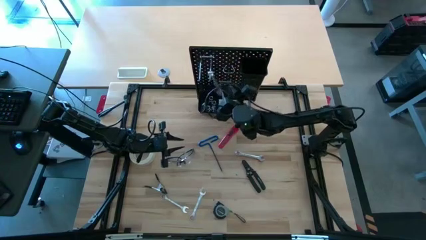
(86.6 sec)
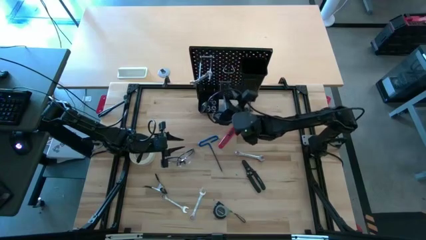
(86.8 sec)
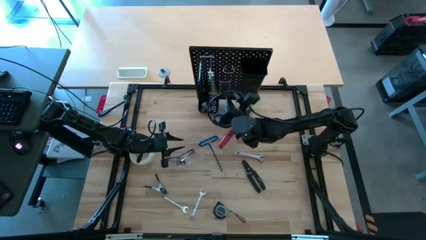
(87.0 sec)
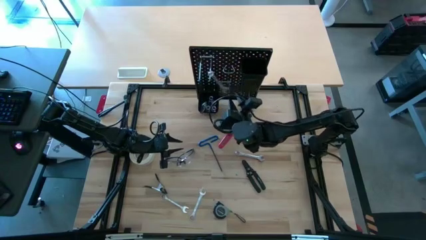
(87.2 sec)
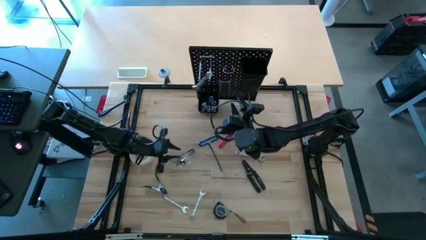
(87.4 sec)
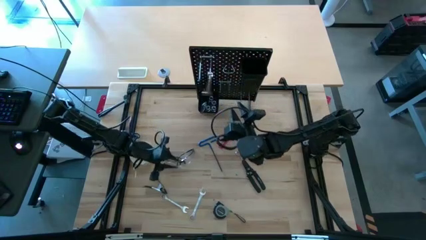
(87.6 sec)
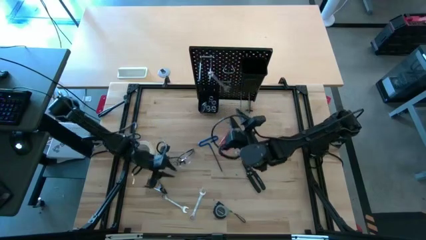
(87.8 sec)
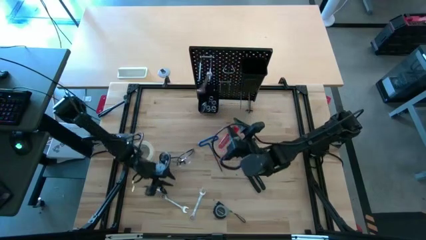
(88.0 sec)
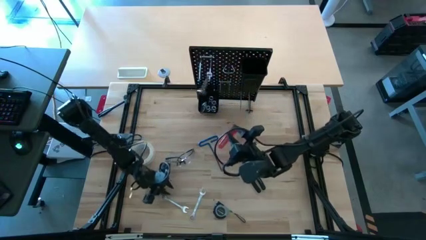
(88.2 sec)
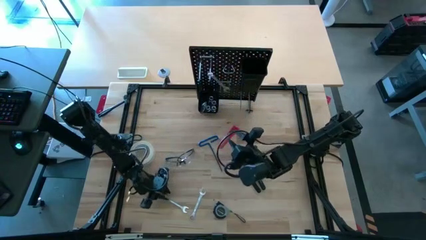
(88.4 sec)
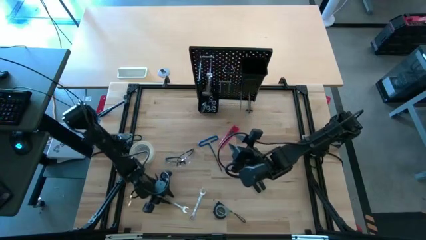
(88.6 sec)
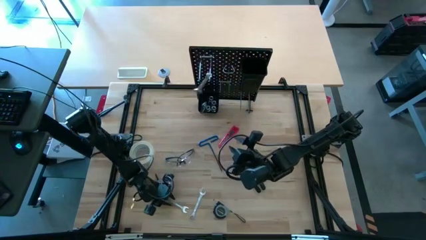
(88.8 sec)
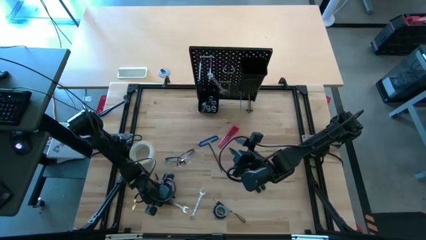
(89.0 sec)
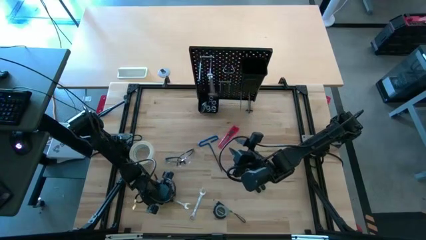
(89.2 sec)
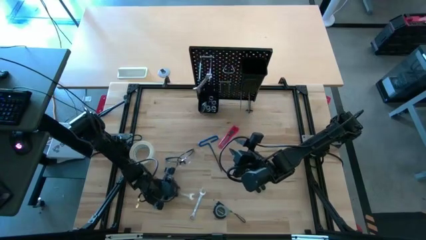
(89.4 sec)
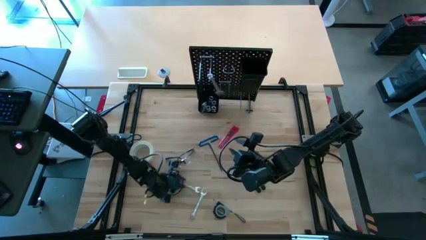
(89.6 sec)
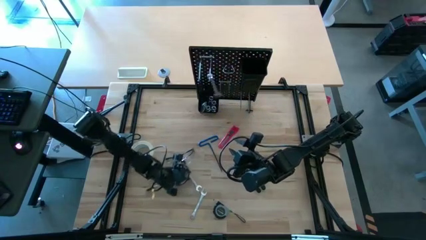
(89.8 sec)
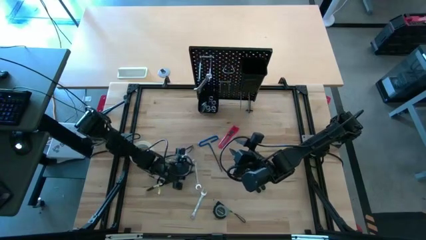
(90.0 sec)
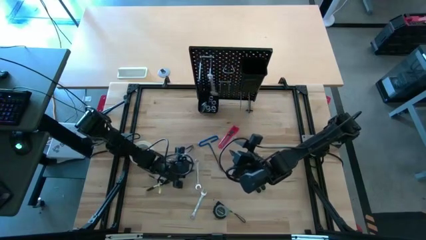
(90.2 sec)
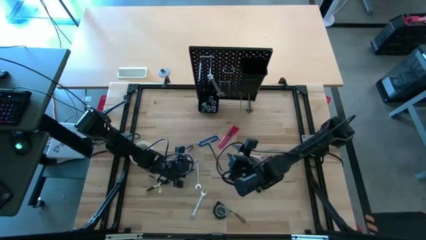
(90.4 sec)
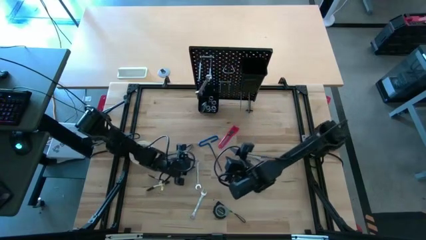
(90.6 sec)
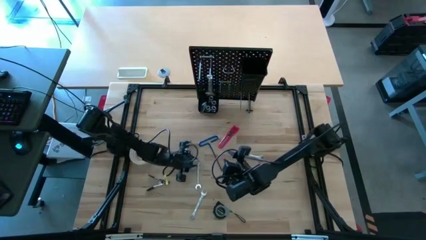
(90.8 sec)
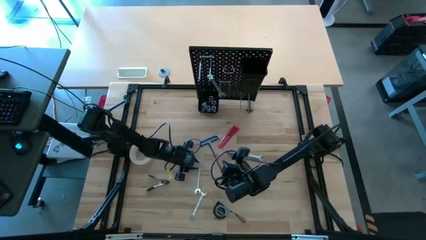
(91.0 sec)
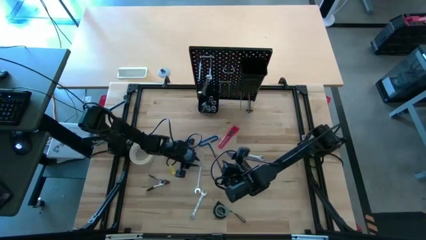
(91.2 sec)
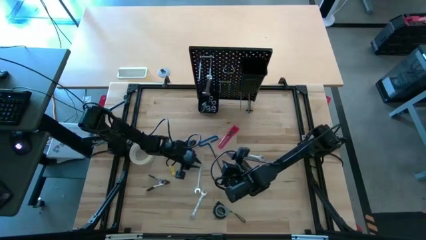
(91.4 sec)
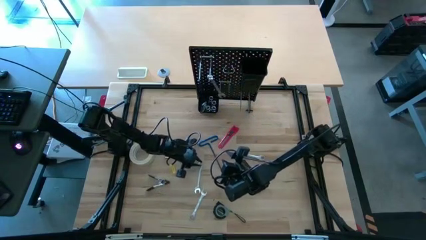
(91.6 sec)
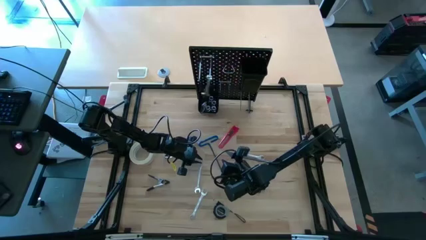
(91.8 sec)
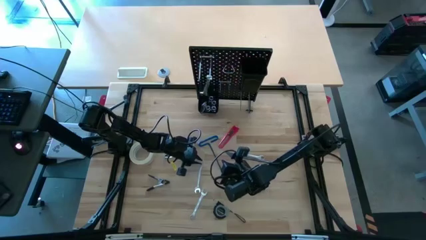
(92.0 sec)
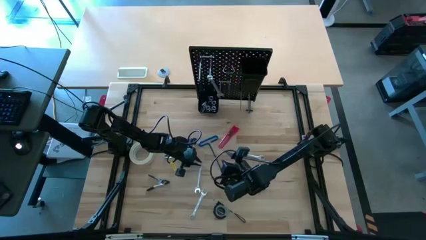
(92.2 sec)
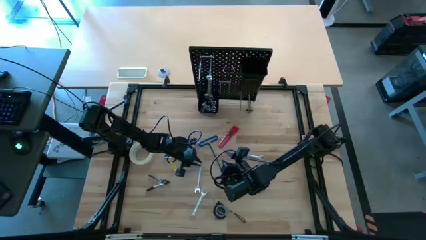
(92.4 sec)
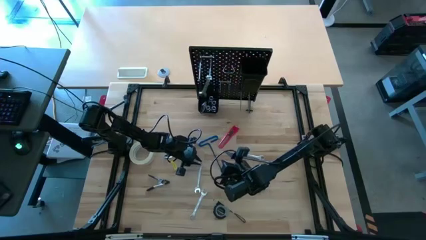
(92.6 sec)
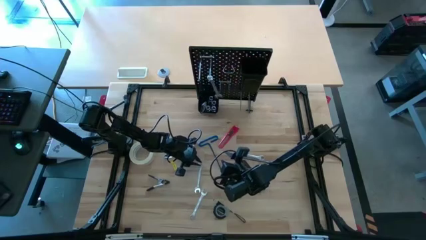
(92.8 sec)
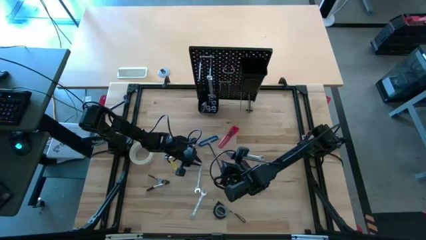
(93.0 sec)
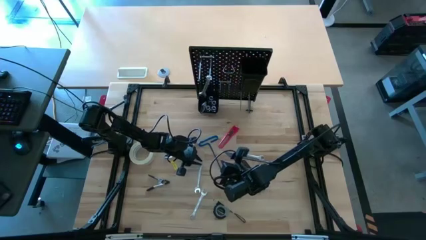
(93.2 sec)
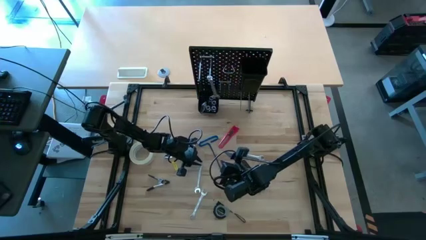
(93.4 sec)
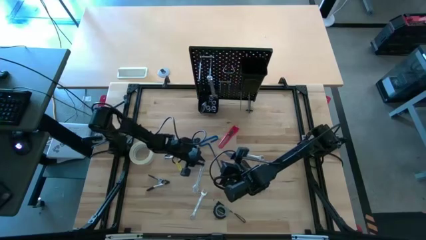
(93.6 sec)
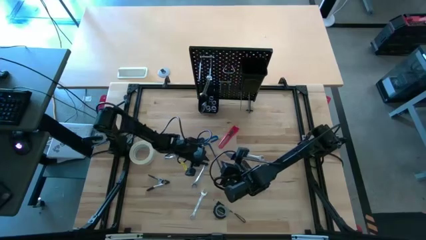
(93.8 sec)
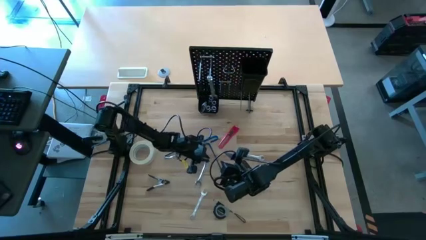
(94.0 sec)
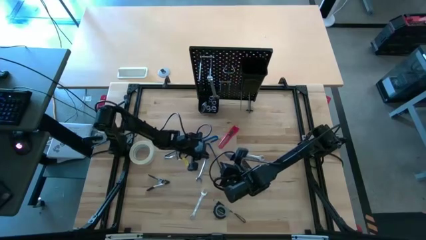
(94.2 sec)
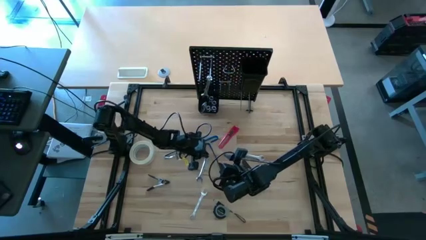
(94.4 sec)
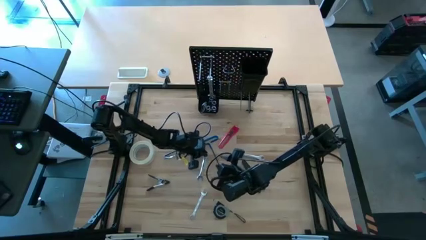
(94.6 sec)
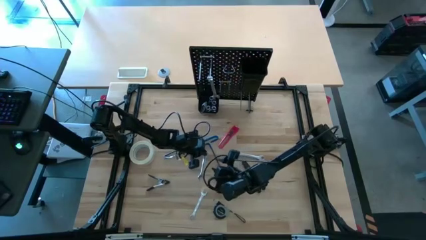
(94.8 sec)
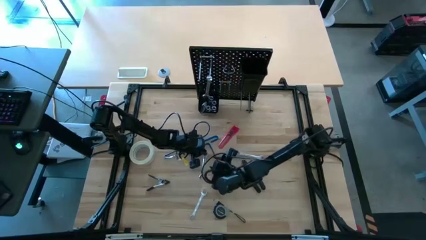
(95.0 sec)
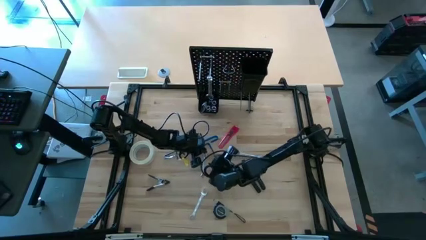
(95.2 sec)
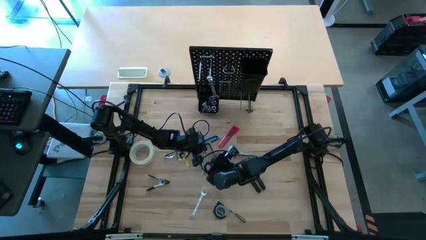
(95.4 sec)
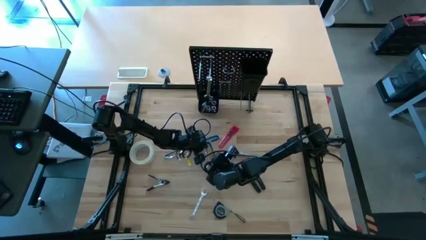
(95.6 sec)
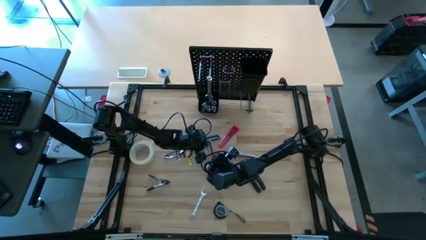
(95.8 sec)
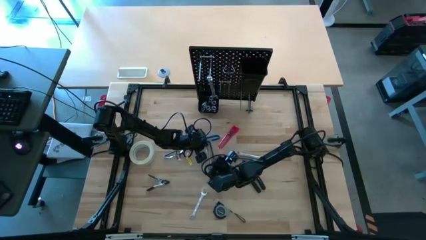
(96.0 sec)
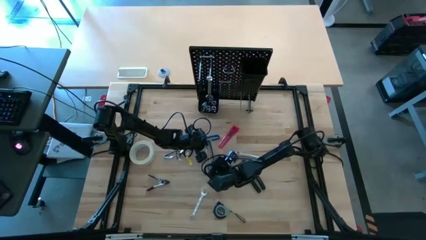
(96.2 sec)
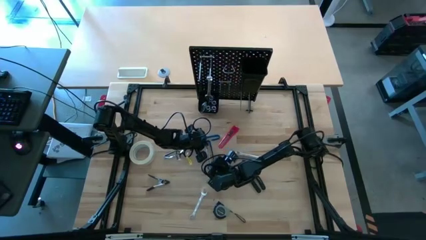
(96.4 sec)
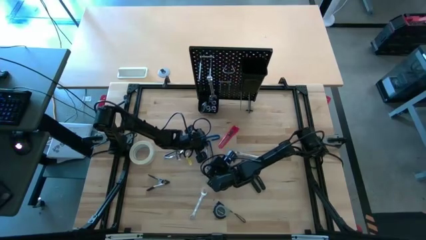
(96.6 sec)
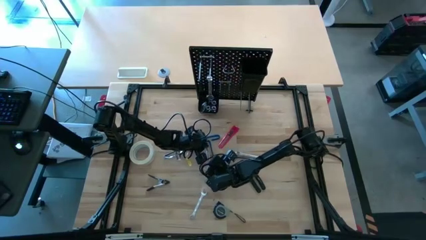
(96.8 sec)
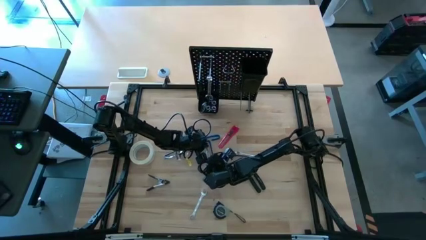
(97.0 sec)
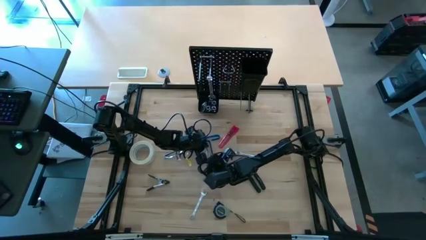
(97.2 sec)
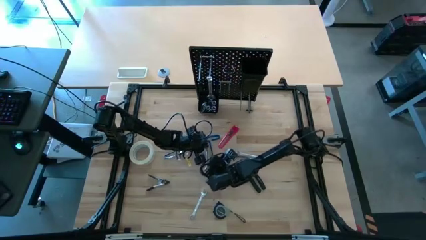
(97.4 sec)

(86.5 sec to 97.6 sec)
Task: Hang tools onto peg board
Hang the bottom left wrench onto the peg board

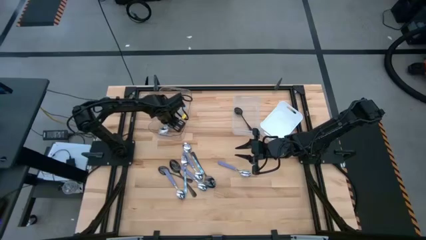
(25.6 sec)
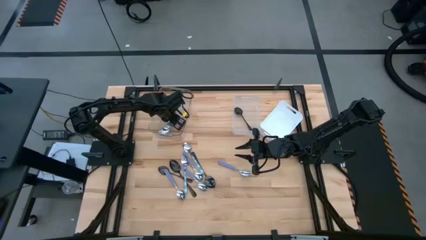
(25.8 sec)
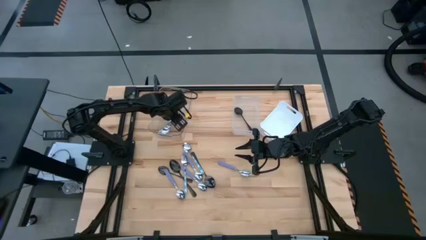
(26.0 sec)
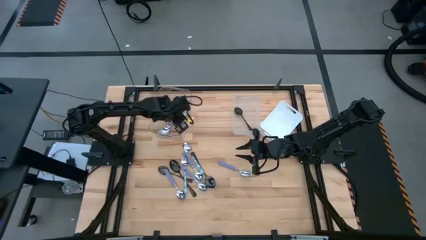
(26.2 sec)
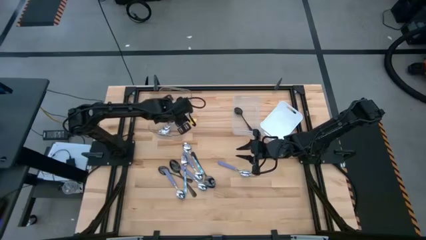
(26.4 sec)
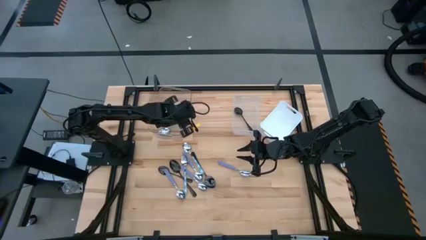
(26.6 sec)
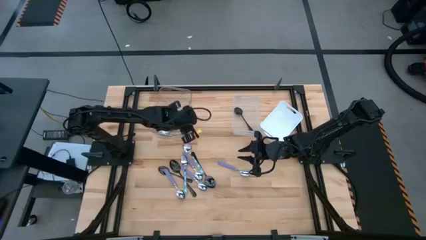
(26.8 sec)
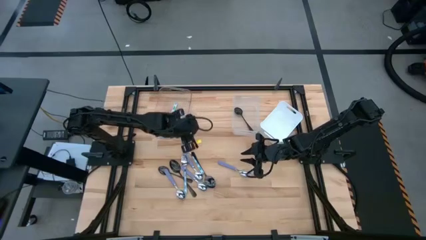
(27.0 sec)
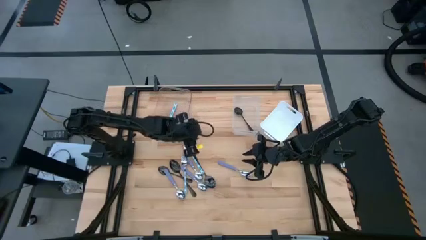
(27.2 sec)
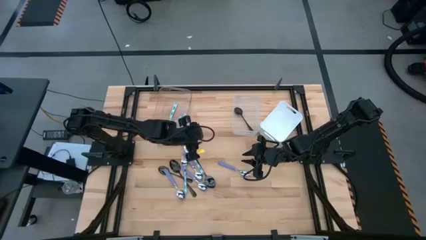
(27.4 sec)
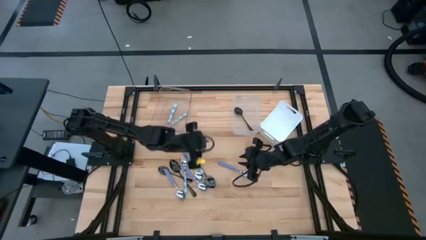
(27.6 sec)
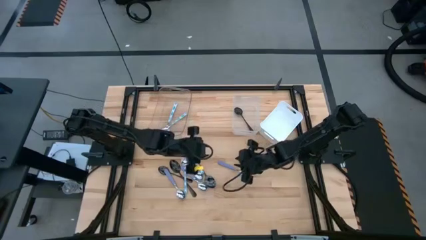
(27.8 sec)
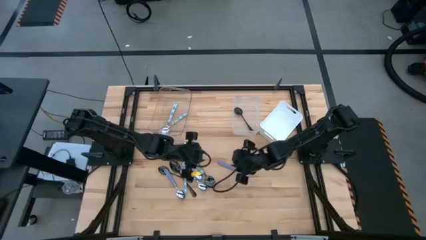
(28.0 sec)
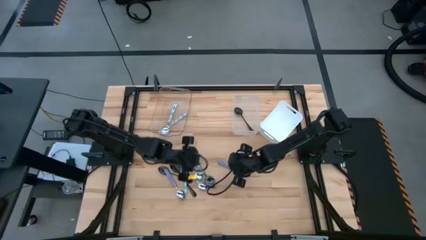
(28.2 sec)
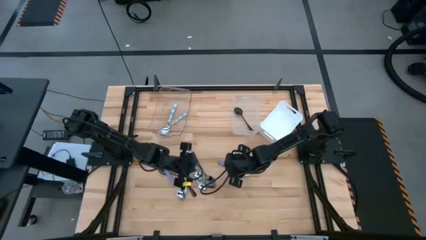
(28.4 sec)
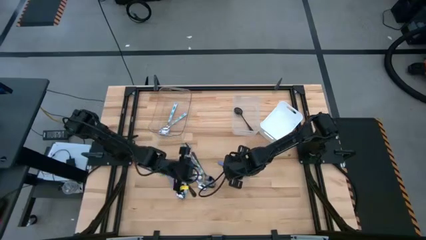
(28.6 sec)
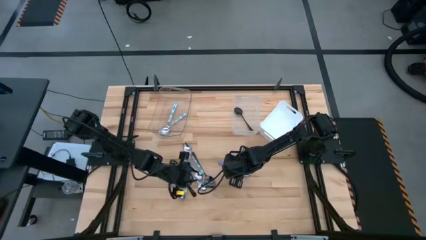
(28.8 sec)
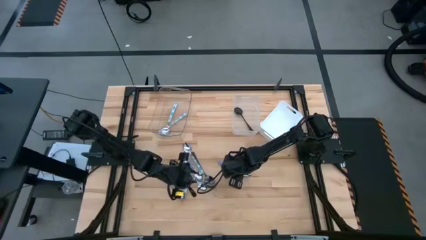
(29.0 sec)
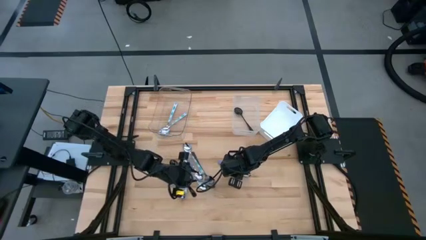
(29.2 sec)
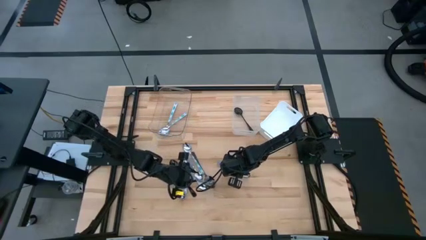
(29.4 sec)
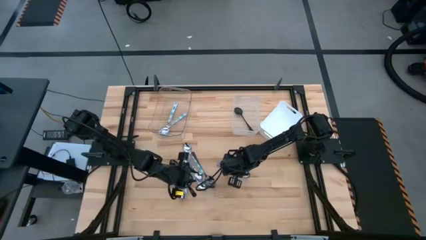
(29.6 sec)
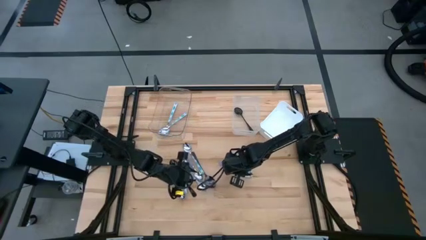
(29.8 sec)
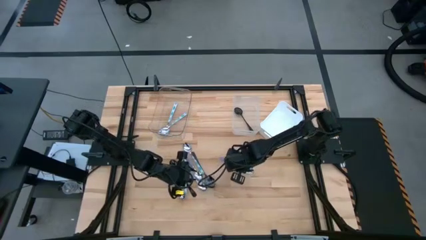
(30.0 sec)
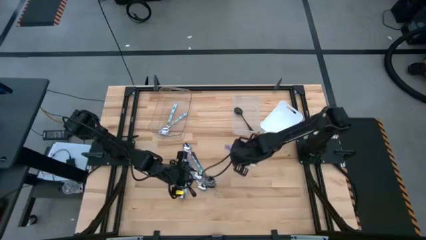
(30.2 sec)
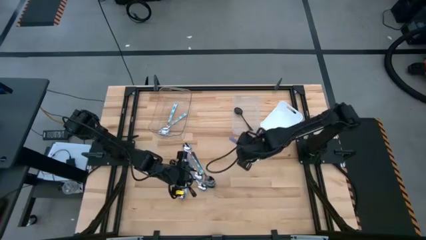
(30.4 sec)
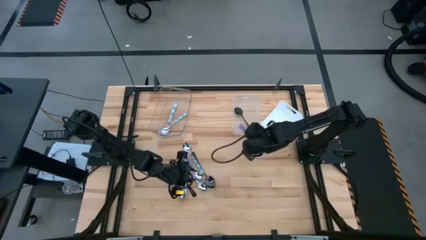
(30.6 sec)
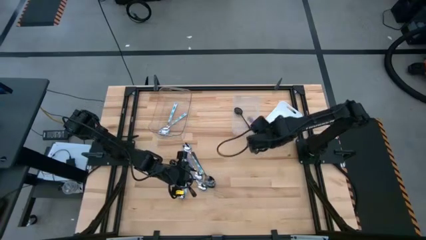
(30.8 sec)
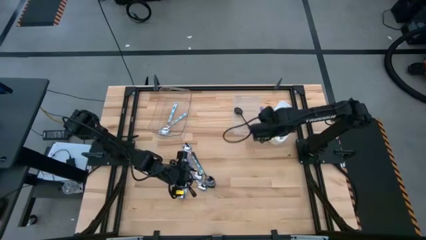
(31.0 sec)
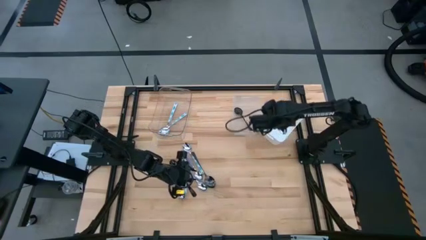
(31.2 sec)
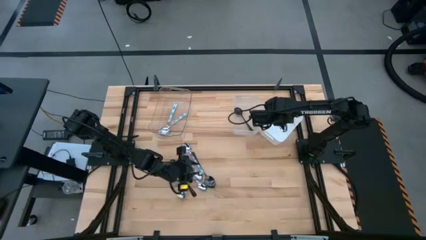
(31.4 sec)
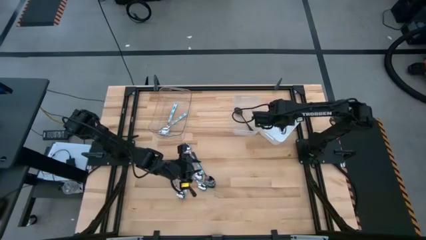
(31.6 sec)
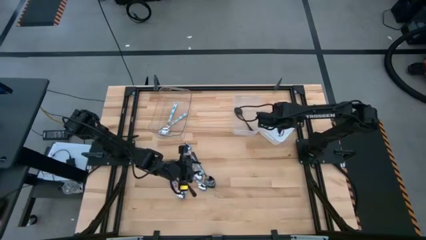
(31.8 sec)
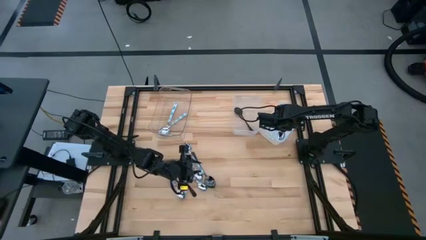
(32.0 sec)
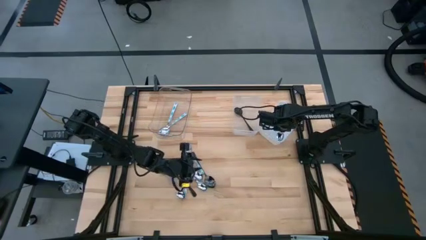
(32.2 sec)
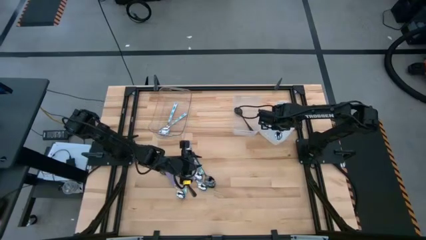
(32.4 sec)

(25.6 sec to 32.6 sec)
Task: Sort silverware by color (type)
Put the purple spoon into the white bin
